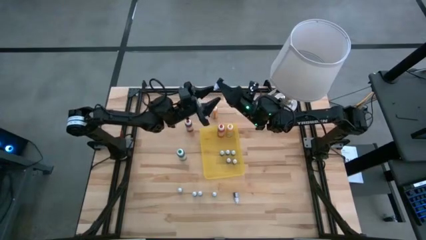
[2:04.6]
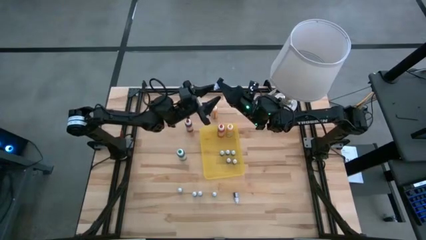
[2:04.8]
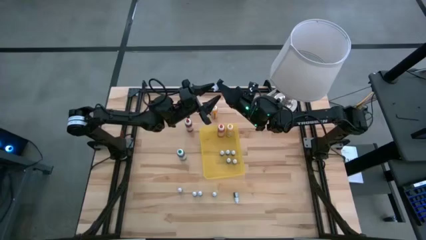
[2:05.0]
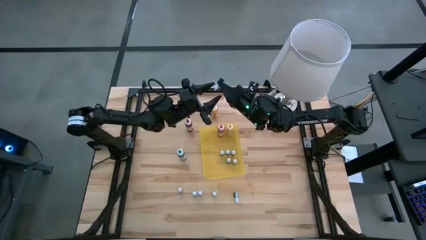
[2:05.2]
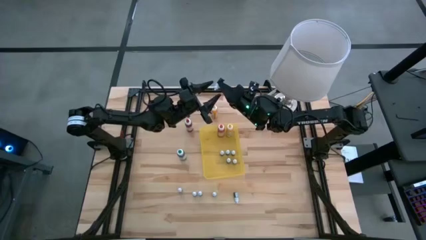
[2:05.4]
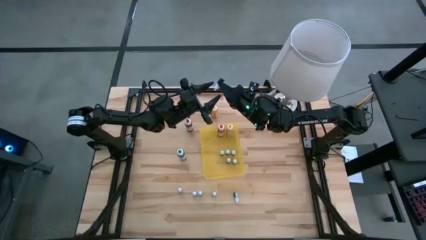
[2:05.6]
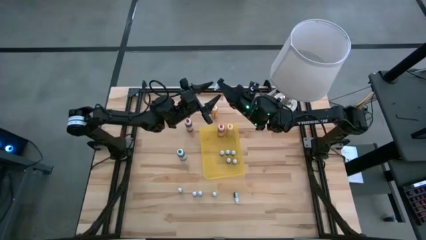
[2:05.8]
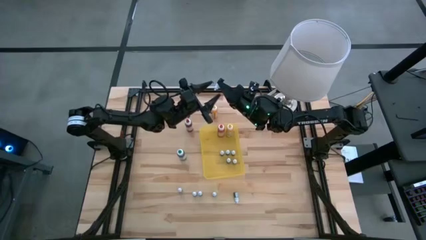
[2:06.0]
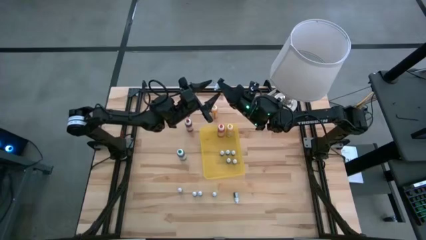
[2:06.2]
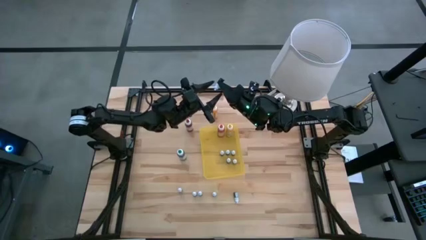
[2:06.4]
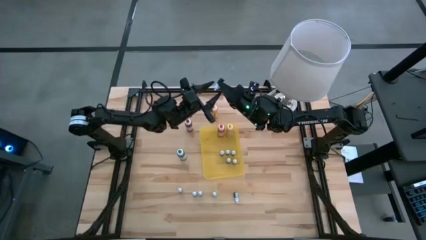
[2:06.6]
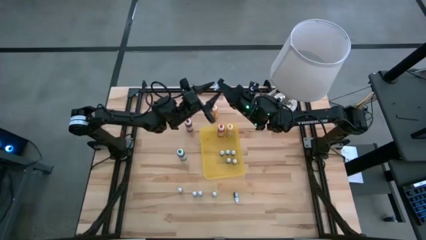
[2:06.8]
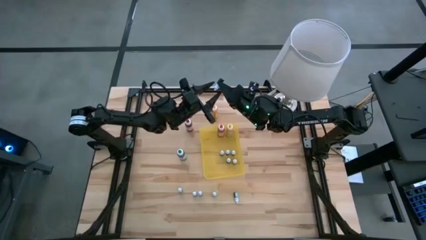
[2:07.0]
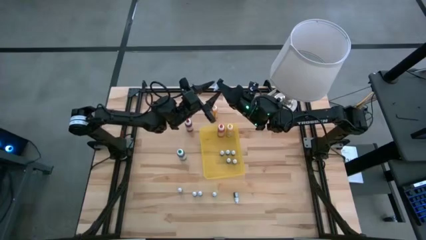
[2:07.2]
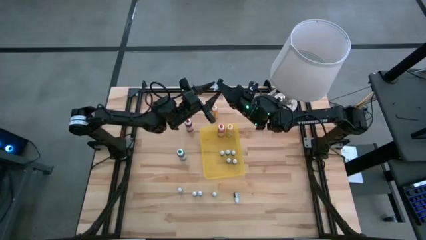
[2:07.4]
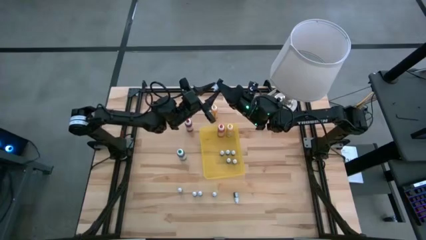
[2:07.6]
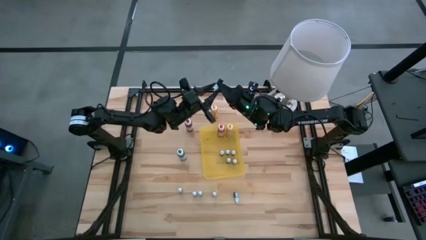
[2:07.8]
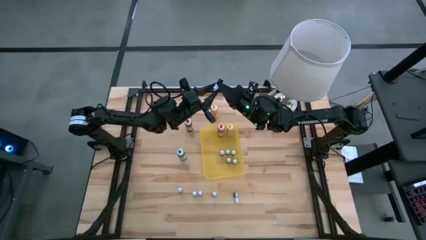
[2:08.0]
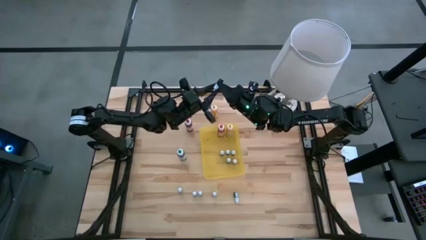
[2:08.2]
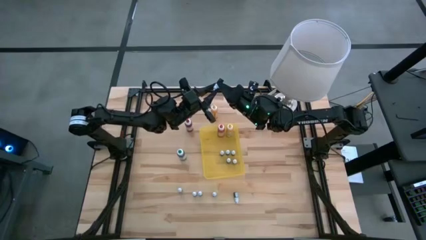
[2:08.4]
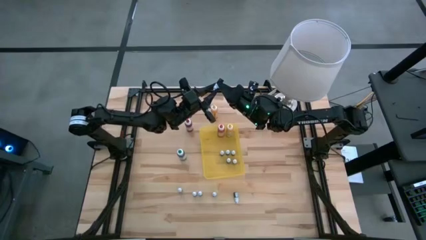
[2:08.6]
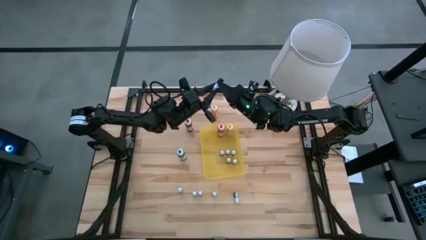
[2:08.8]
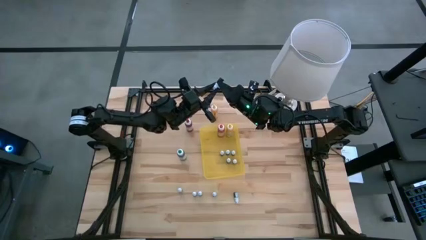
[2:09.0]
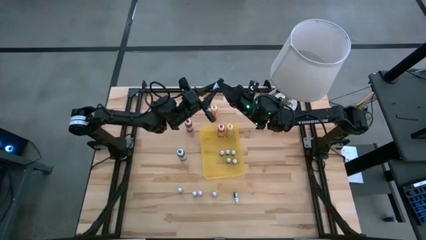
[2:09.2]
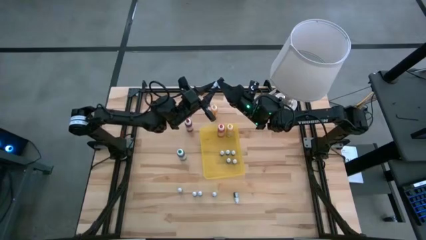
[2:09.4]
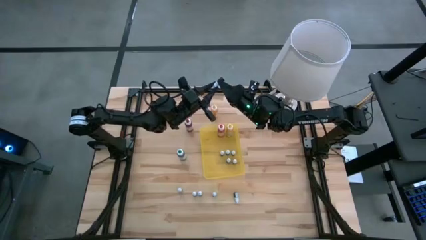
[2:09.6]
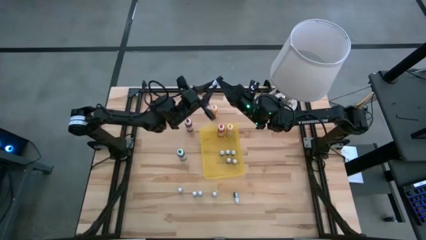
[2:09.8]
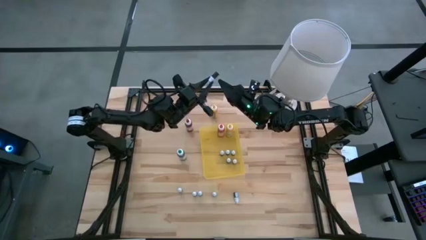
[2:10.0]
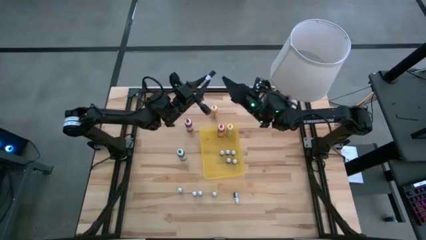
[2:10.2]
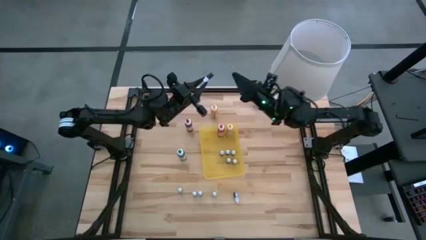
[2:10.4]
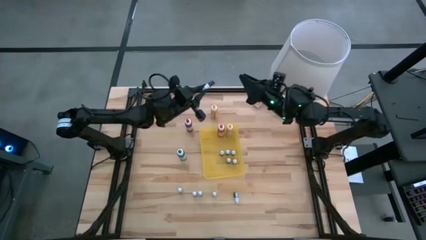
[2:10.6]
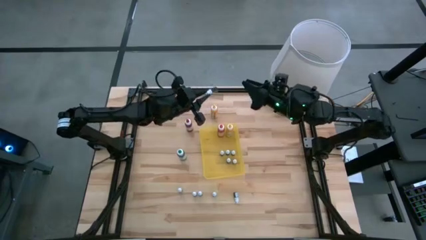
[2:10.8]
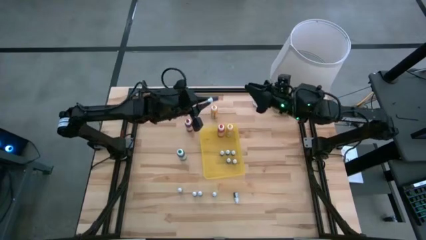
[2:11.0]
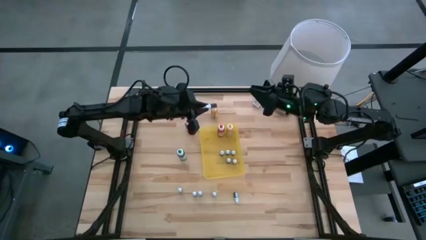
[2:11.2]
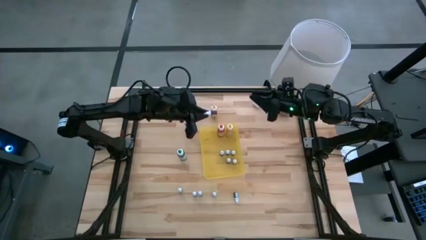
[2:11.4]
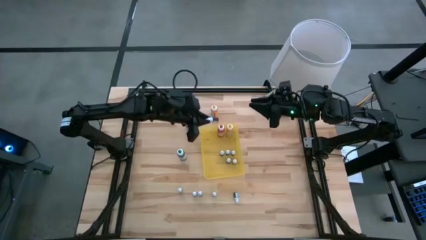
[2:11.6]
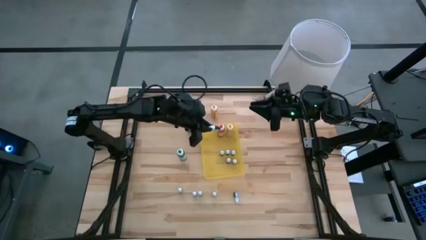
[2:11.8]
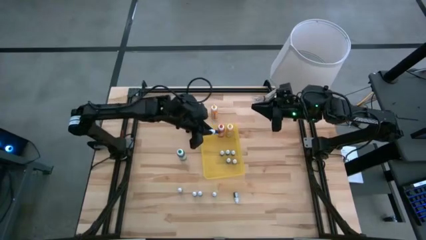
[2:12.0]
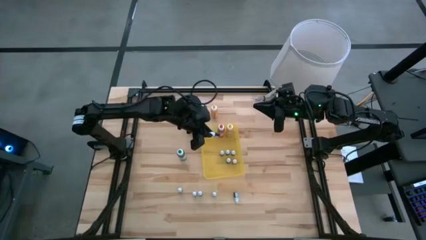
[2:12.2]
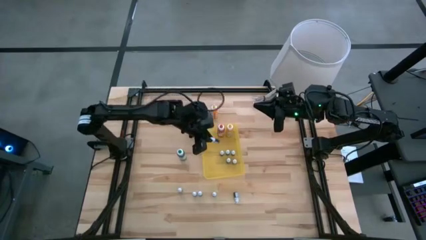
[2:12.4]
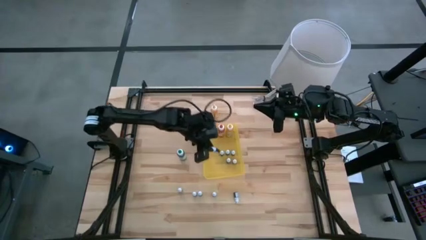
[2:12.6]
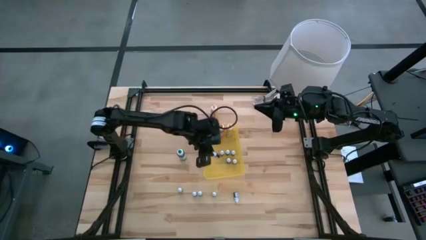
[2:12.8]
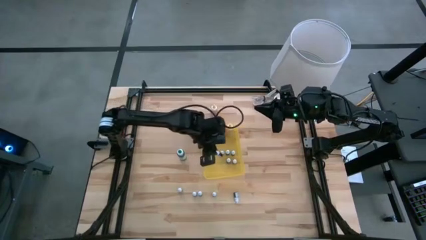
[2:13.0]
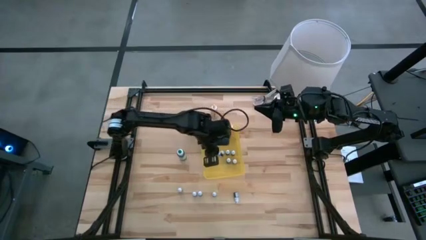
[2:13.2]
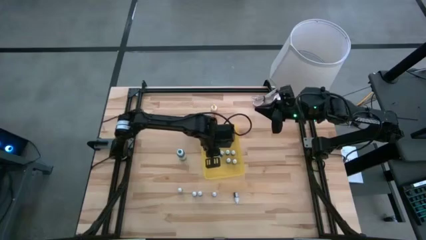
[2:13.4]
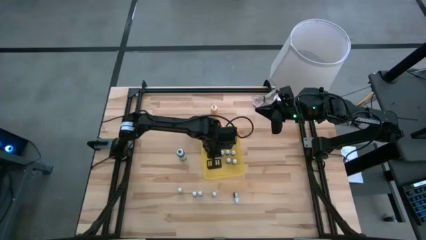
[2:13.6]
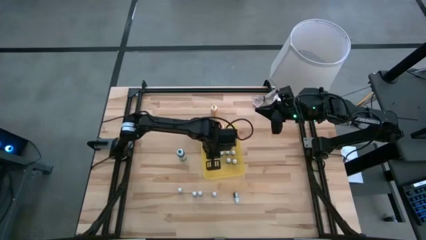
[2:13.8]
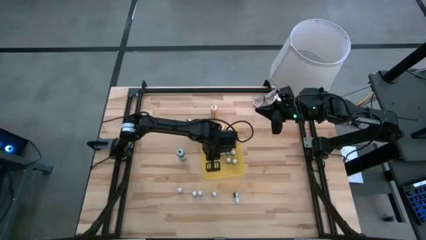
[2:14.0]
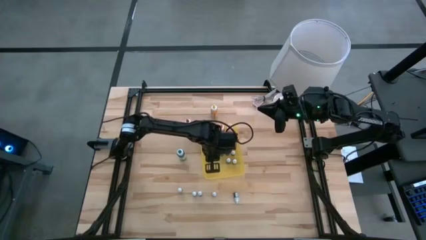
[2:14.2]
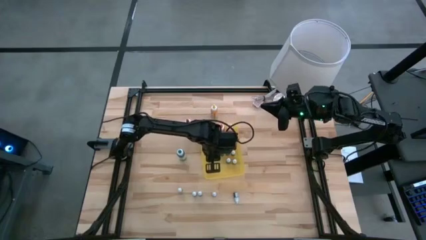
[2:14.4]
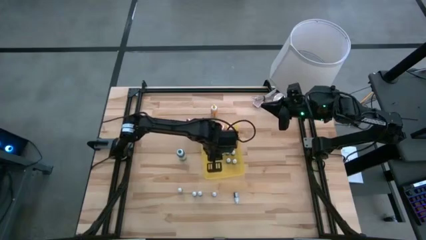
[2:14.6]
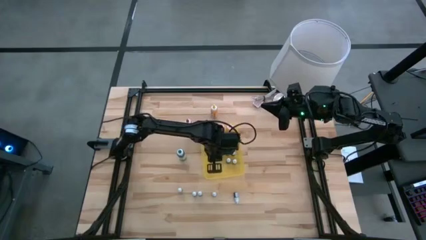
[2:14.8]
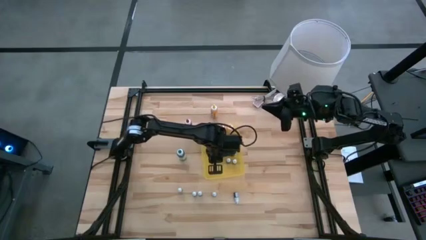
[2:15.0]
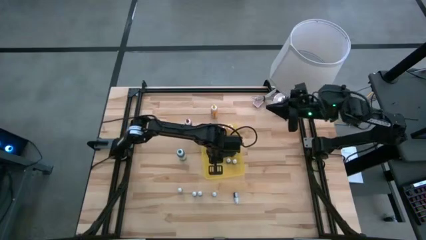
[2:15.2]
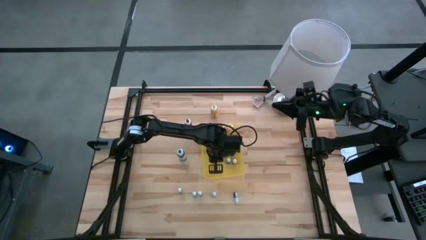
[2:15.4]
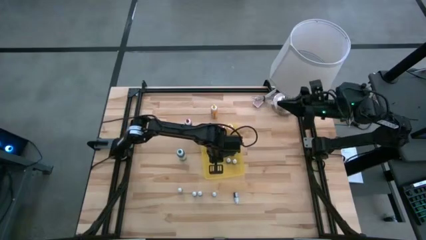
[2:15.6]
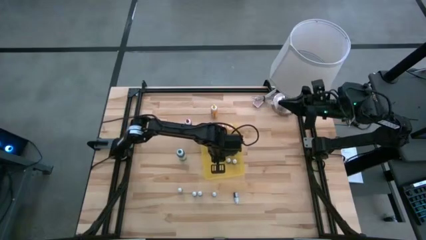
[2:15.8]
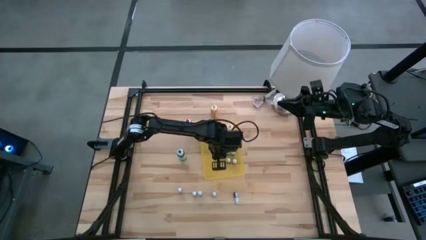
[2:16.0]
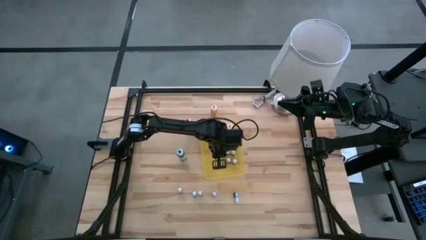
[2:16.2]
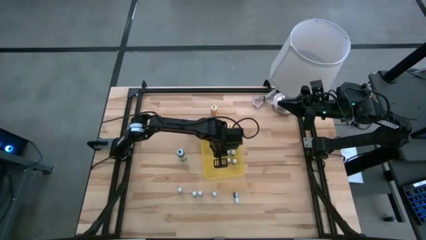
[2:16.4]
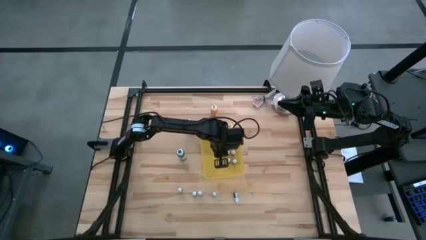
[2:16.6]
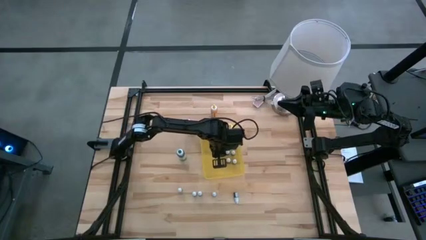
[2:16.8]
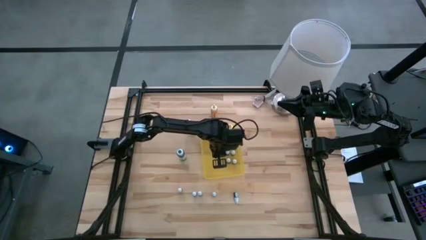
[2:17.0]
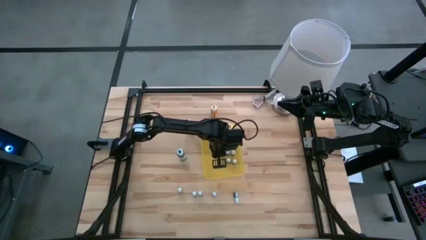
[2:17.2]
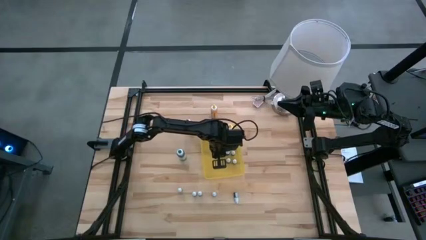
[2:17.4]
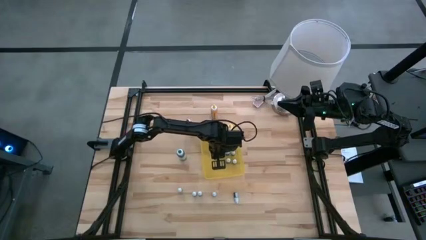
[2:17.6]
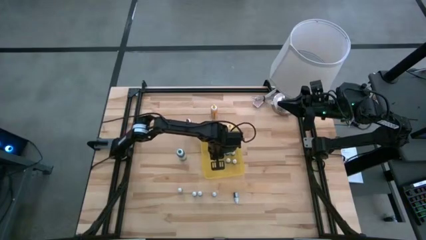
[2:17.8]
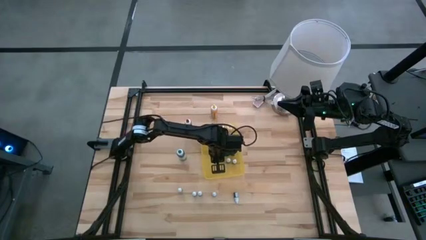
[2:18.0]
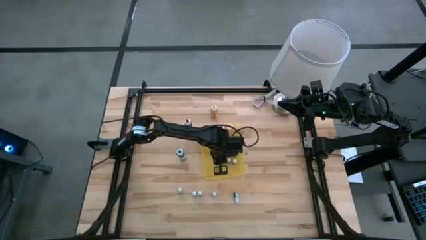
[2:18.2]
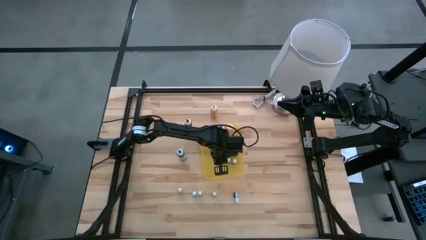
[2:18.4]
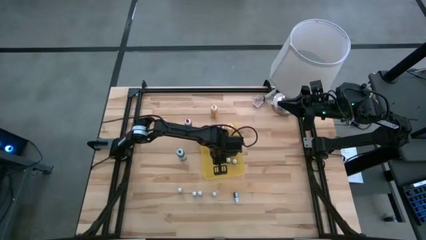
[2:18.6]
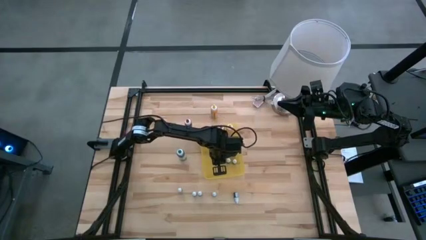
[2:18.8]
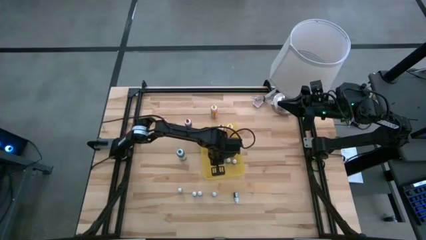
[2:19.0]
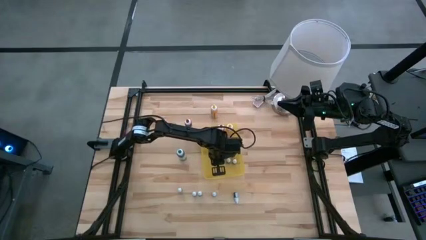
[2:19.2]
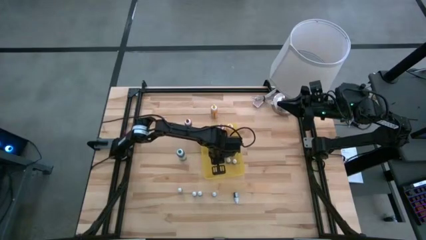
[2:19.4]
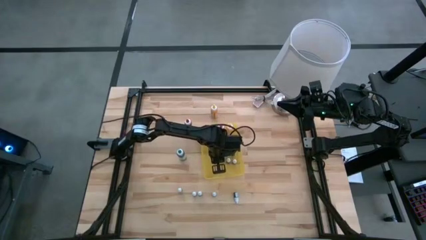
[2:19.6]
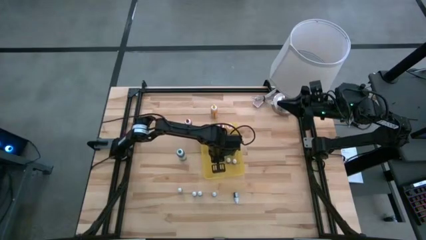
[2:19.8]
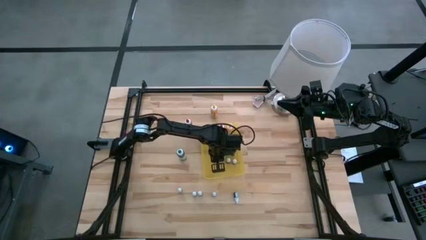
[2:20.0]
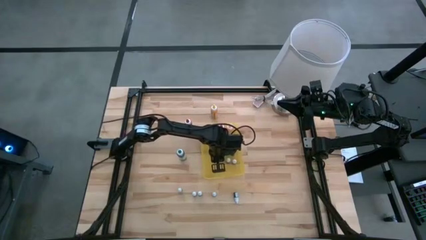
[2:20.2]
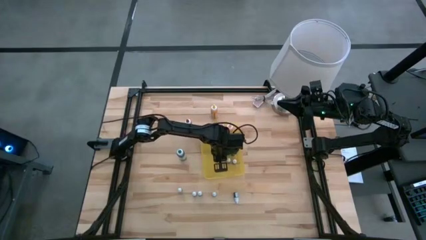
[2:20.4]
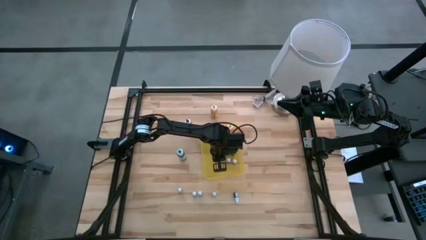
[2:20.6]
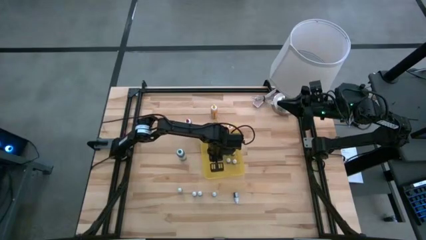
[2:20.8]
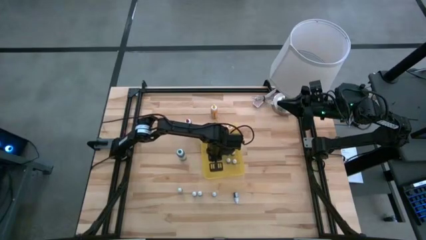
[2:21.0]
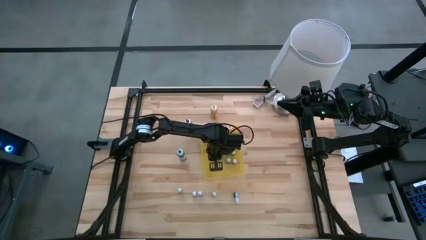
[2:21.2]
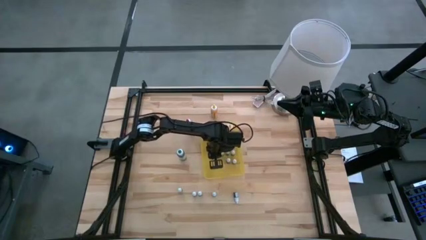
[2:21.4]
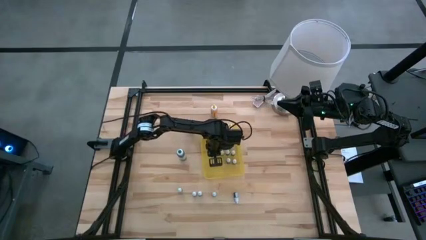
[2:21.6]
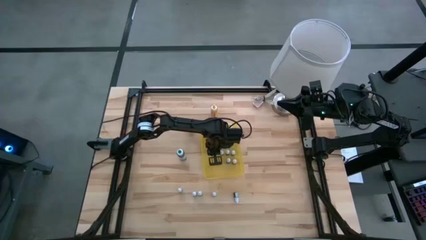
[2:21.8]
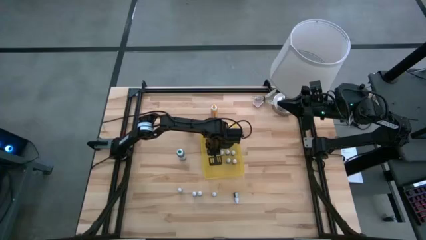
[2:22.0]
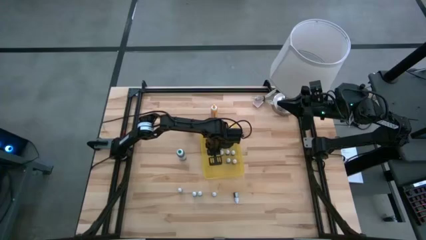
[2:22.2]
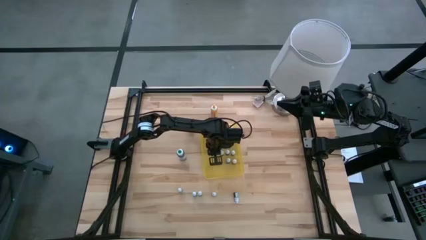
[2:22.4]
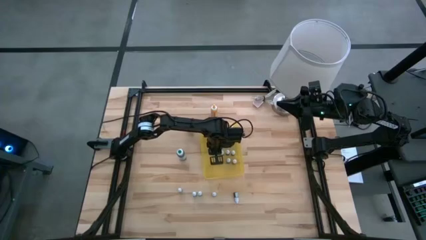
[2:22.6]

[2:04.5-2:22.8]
Task: Pick & Place food coloring
Put the small pink food coloring bottle into the bin
